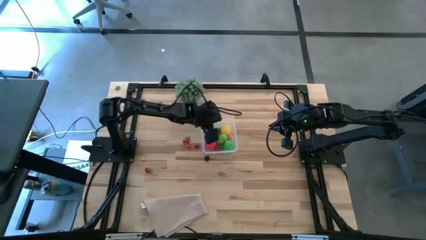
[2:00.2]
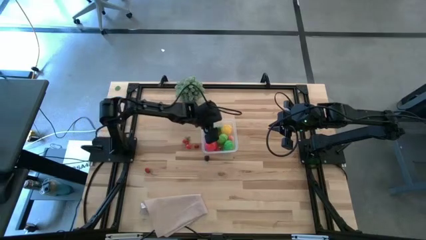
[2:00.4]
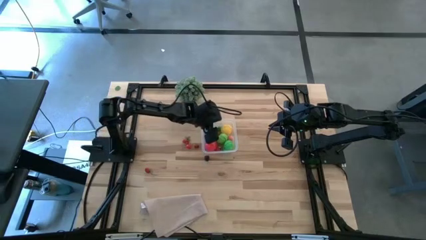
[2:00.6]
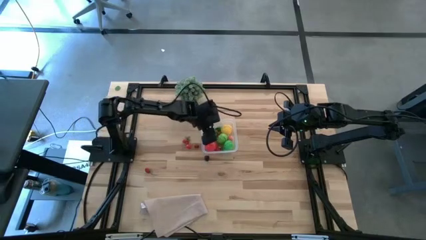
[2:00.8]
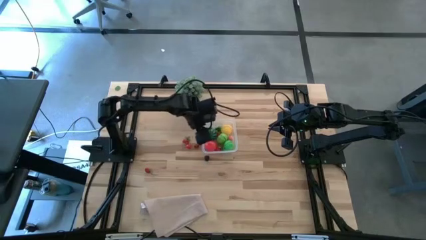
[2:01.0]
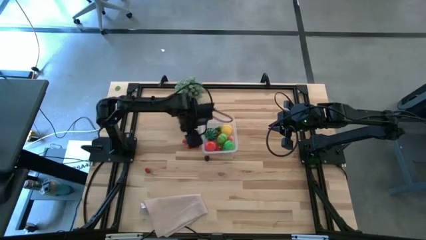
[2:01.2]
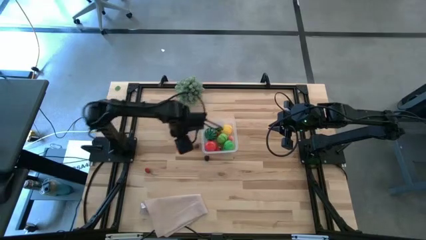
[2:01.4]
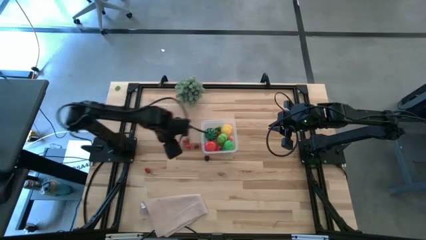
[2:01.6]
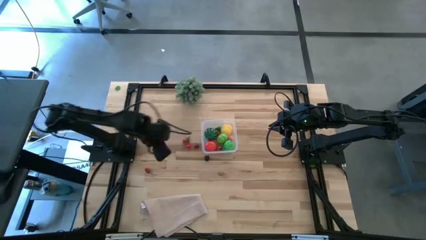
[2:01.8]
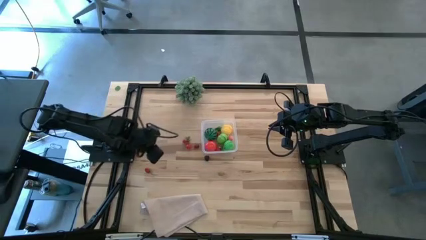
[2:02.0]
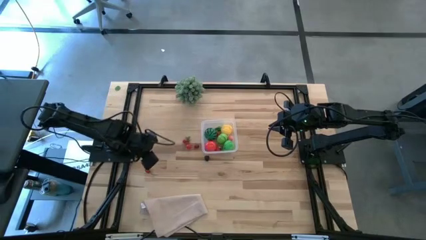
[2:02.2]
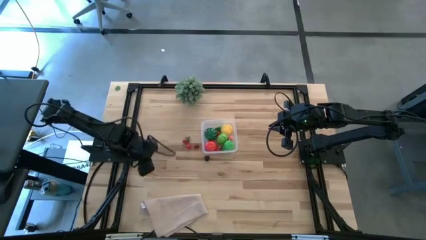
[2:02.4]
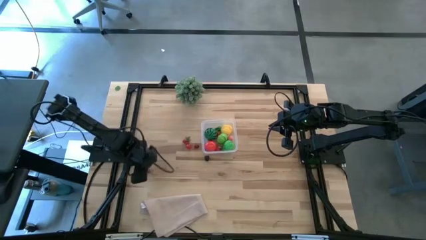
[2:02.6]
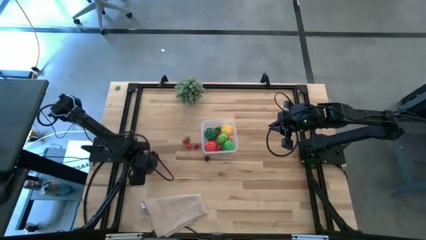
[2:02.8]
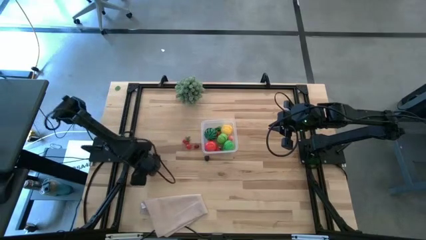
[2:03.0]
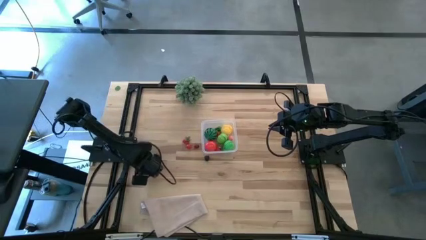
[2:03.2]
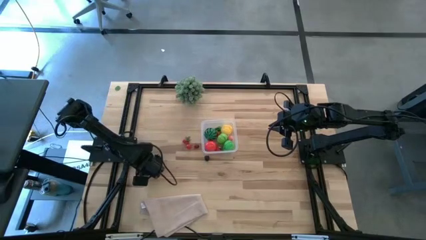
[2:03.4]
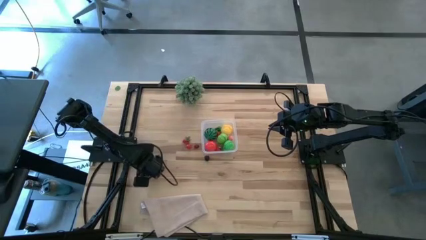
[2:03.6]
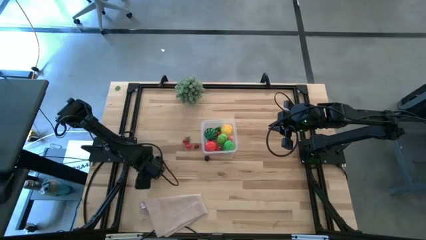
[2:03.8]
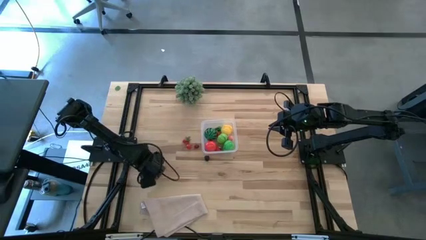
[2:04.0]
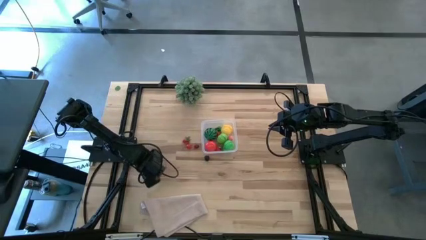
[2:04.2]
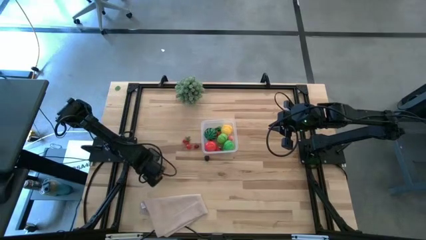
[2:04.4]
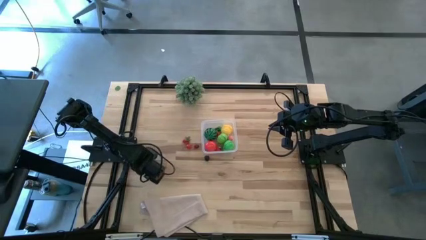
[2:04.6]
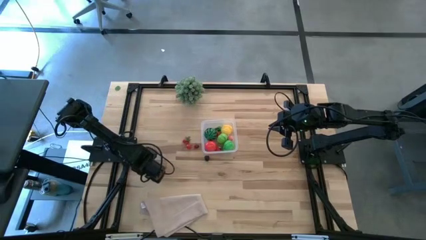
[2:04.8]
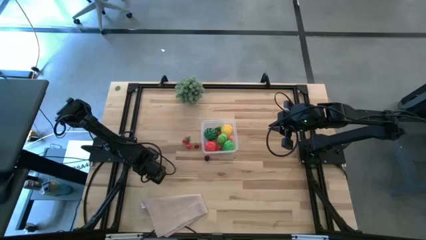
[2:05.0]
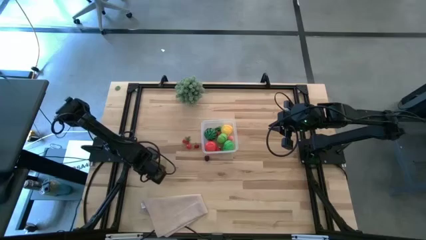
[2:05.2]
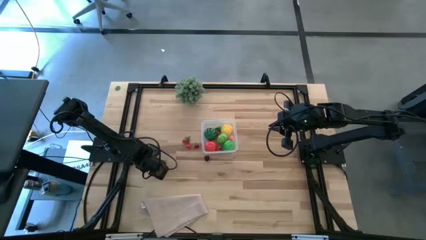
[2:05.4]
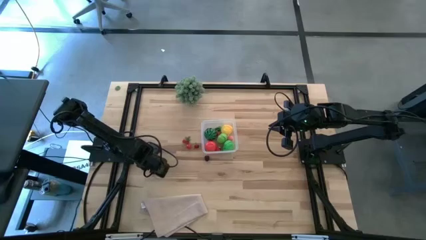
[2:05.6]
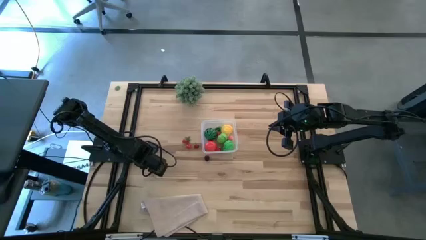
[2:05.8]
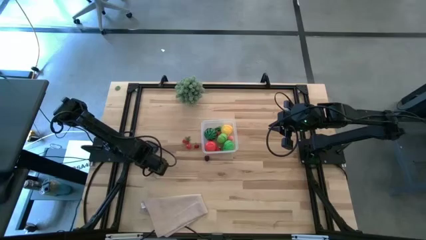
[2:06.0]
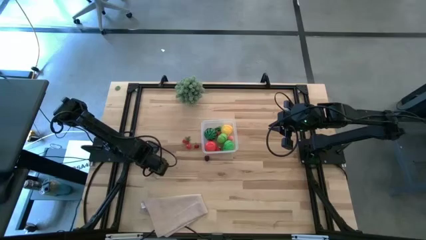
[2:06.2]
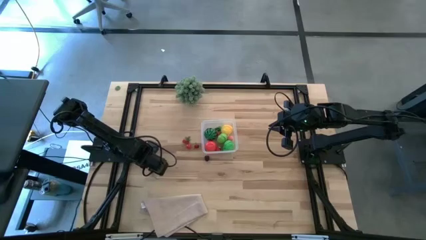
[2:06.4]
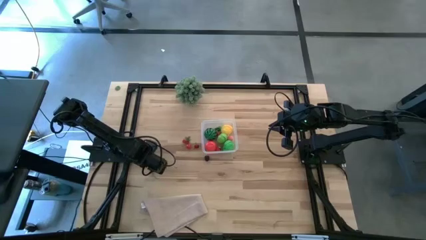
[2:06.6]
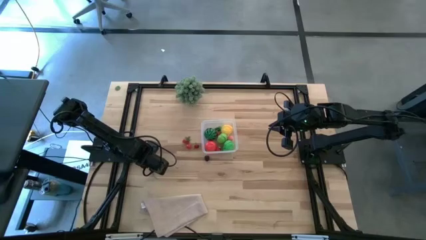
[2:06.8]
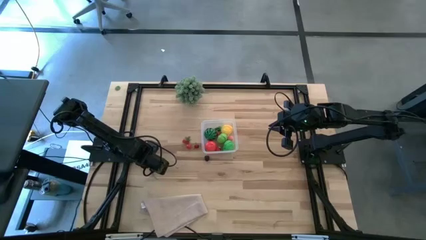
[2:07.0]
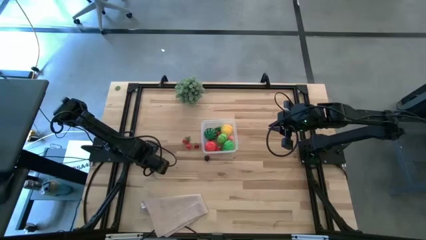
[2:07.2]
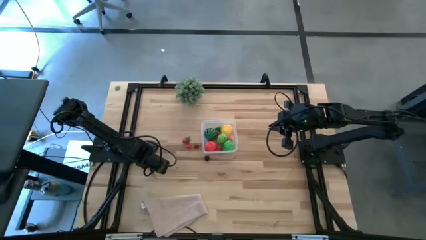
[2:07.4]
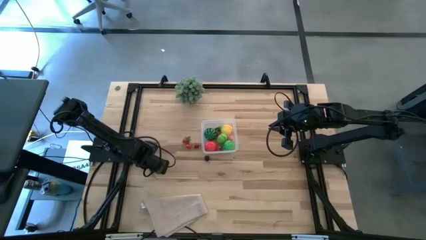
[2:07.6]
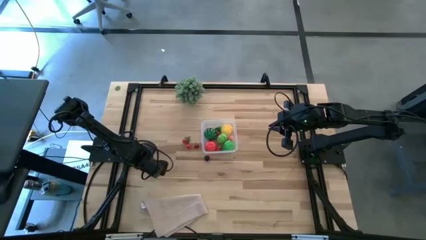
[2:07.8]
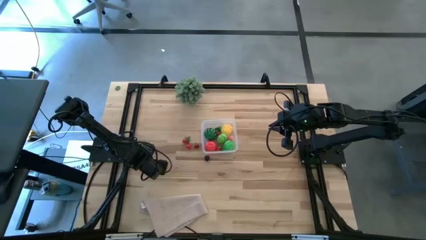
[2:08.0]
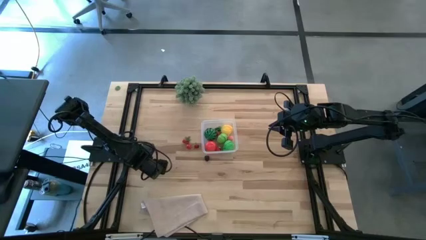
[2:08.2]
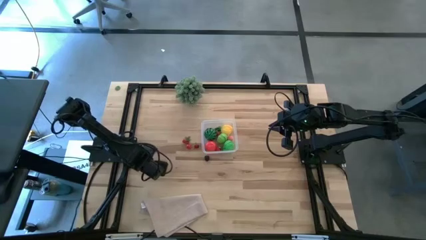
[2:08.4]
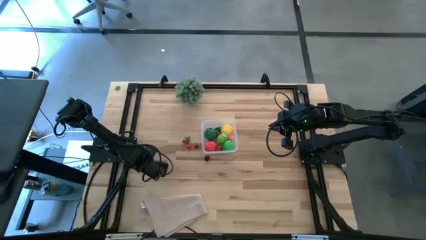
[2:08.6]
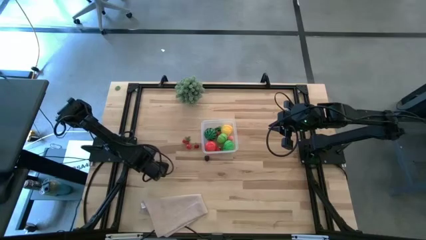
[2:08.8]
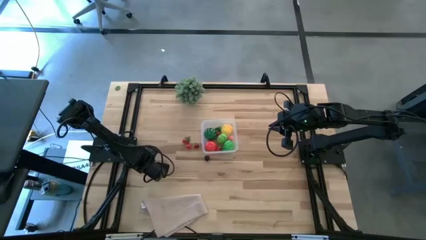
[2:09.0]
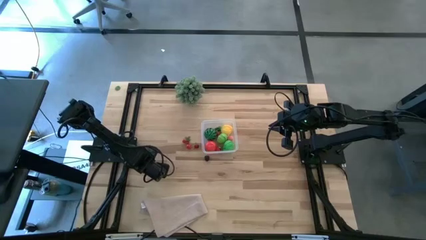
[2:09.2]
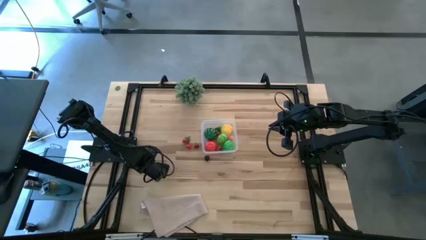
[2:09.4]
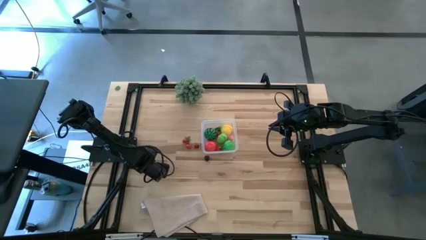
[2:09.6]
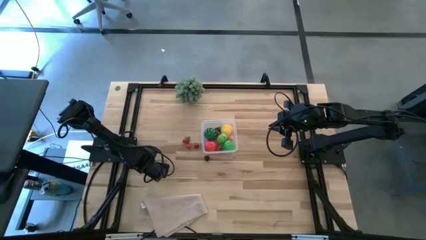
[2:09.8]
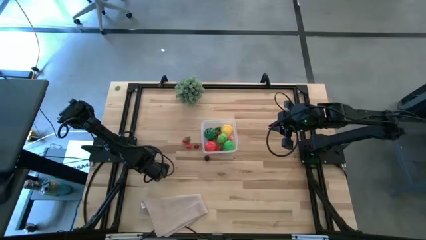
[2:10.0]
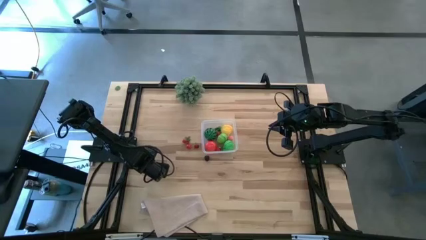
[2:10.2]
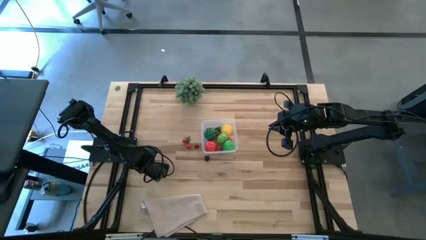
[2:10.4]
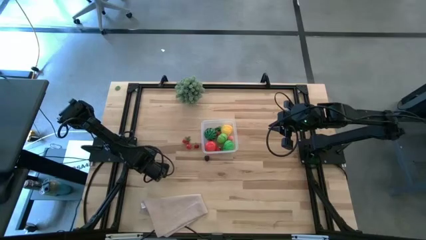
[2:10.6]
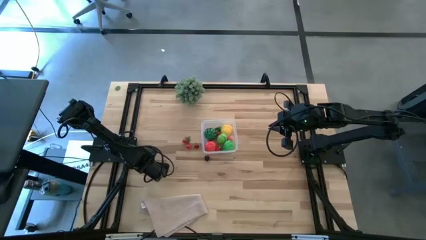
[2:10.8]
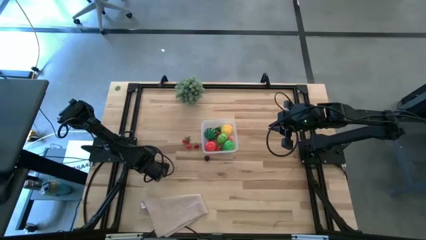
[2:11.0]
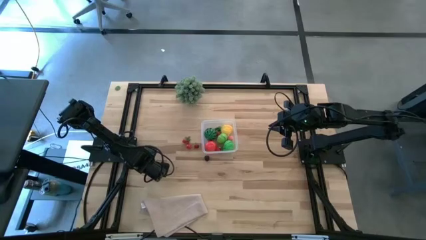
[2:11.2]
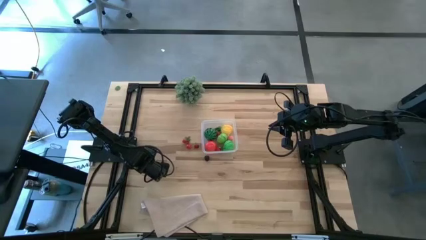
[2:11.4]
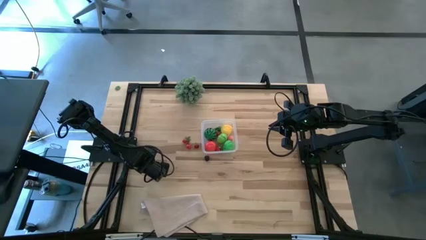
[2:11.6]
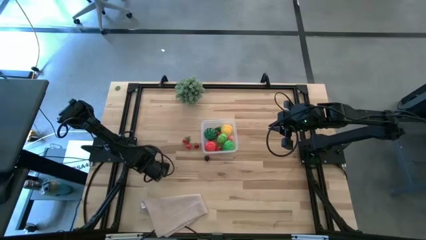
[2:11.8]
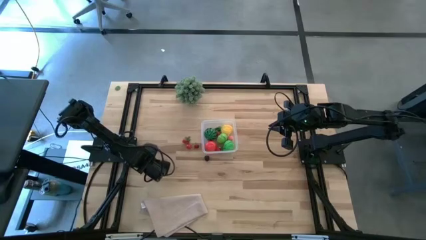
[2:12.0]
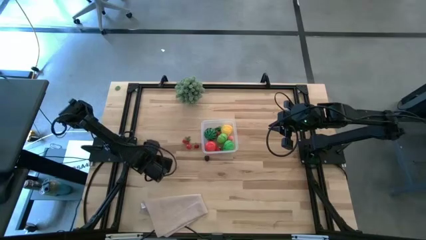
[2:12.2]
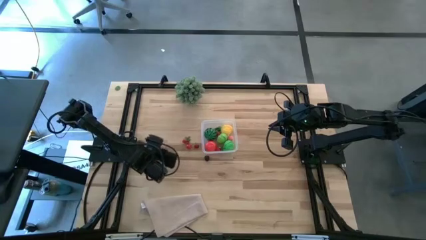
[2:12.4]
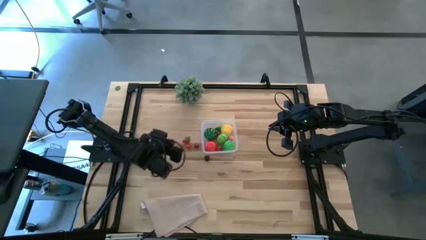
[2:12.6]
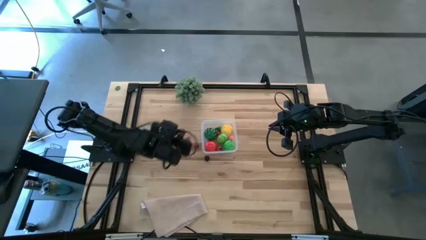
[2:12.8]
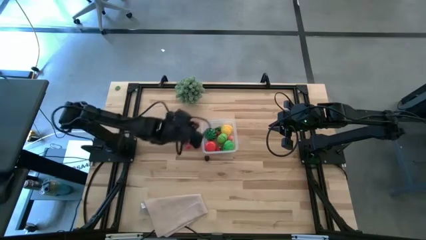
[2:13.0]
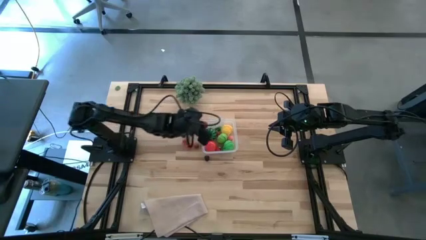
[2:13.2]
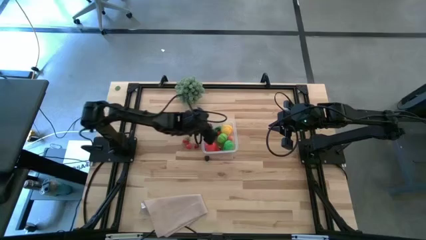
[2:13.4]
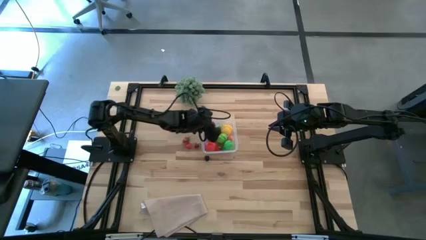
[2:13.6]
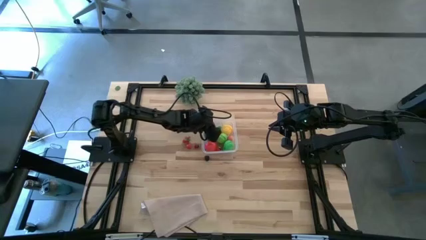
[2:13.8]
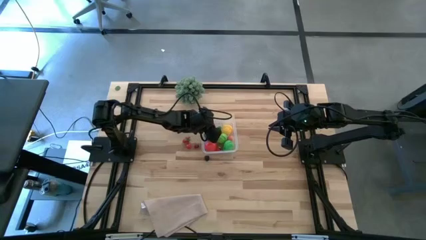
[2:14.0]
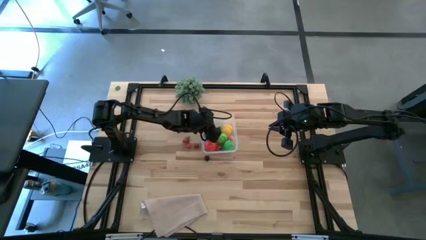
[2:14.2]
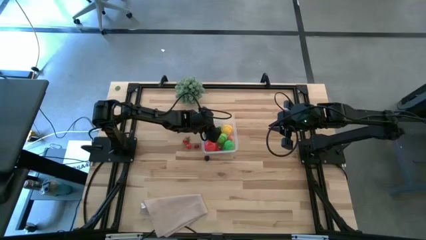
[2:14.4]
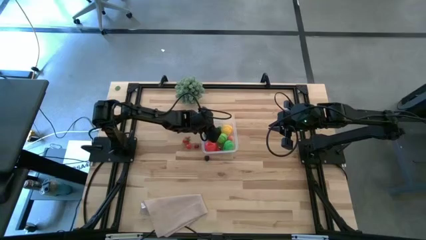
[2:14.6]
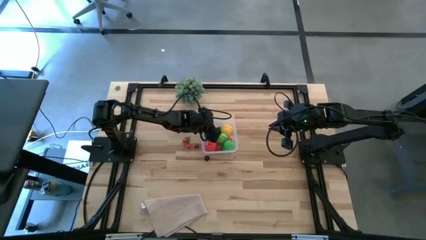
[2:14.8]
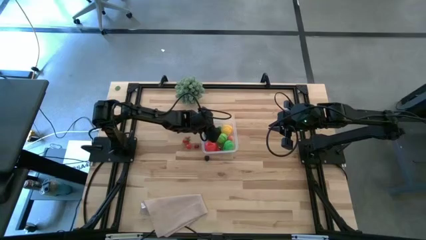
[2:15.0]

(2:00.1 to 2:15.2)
Task: Pick and placing Produce into tupperware
Put the bottom red cherry into the transparent bin

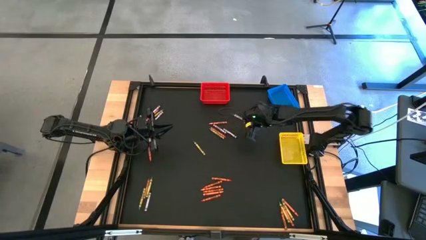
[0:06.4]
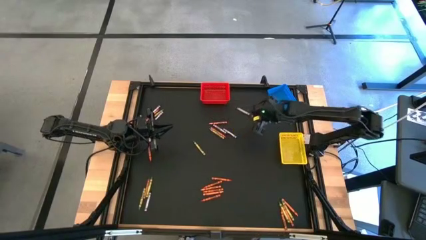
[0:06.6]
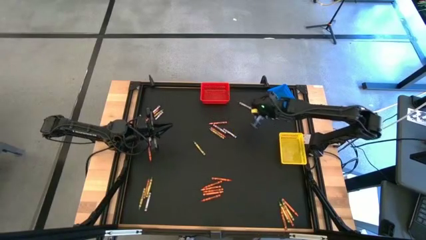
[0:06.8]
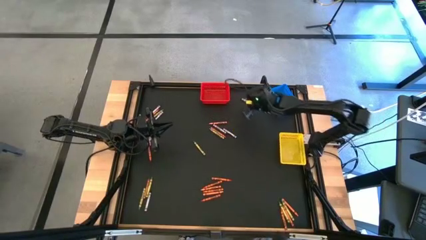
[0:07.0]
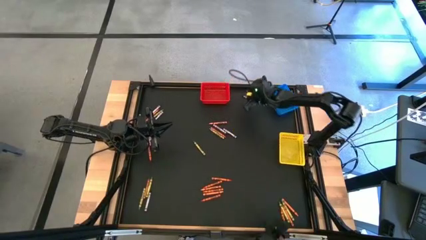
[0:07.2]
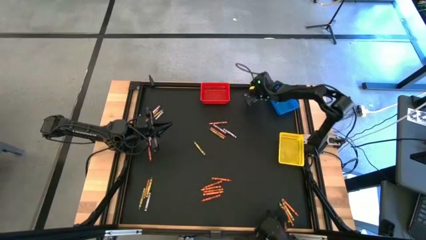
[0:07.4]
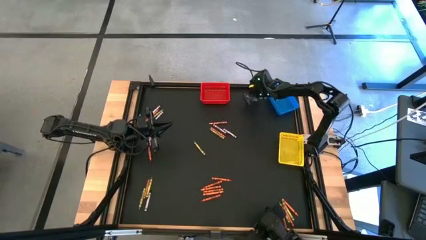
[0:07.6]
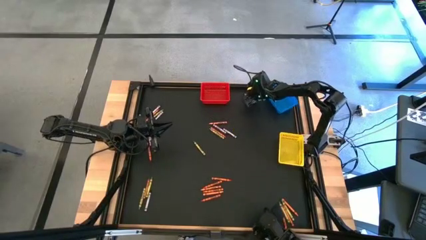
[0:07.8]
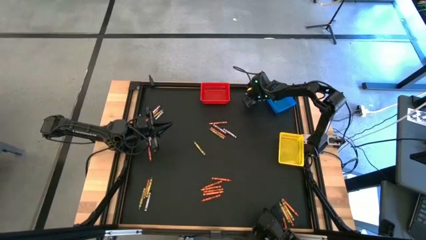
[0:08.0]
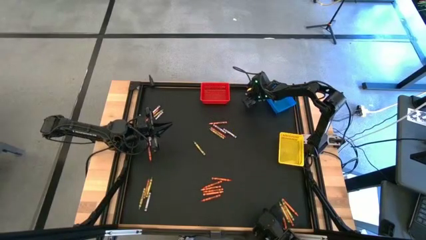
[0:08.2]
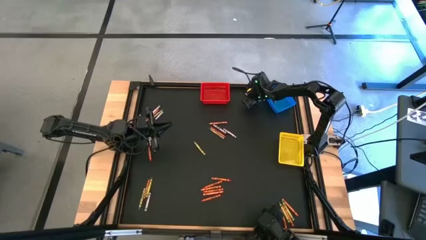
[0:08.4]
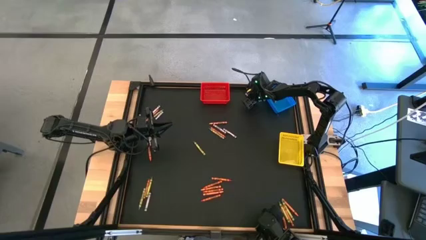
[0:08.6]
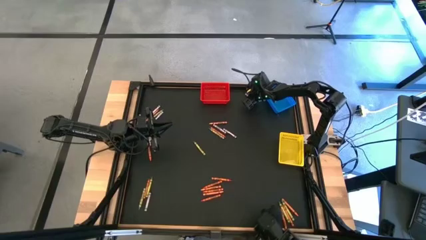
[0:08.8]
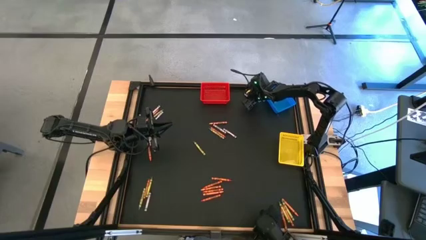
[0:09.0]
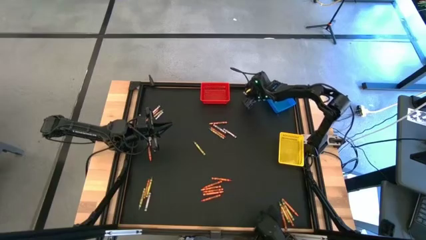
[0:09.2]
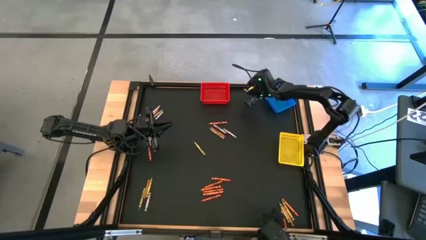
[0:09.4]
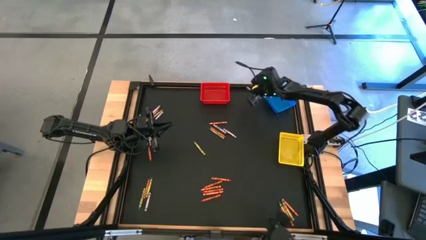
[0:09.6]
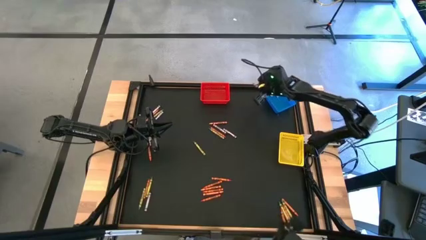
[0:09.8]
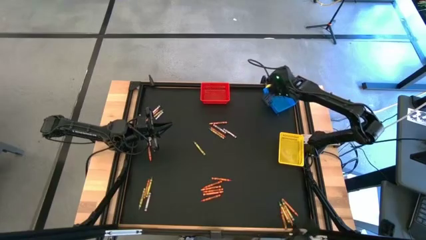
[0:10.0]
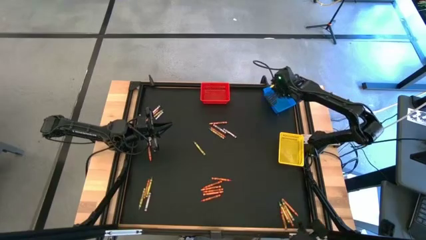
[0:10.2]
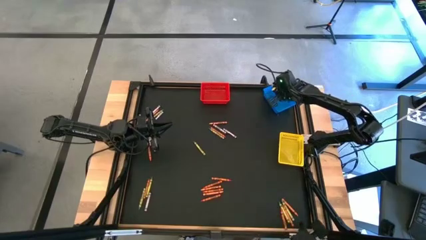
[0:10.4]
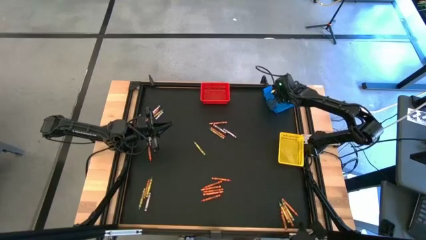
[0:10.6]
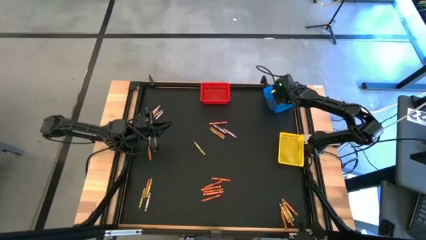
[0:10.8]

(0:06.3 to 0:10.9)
Task: Sort crayons
Put the black crayon into the blue bin
